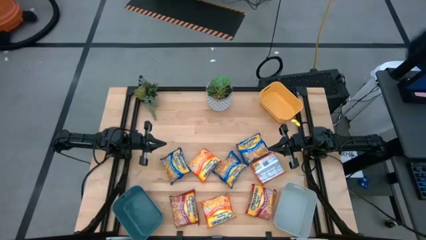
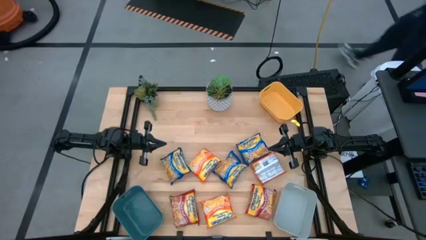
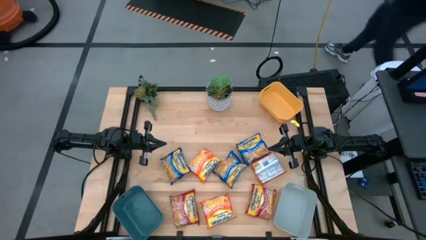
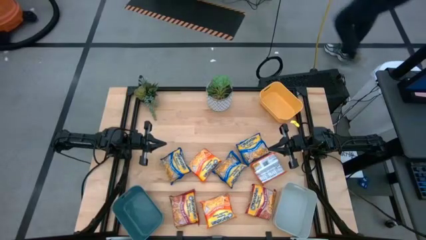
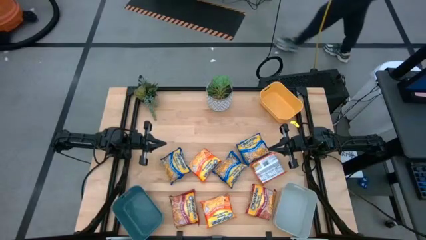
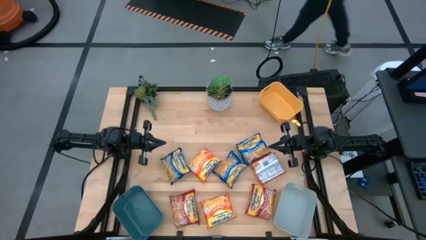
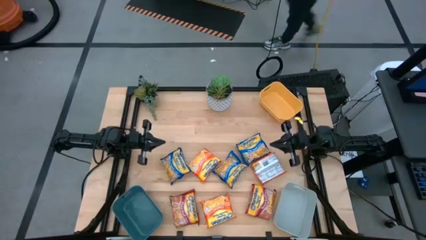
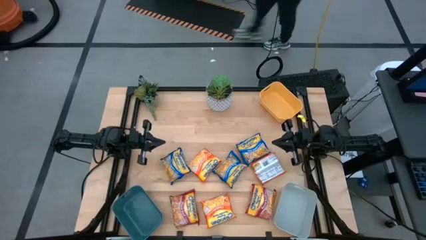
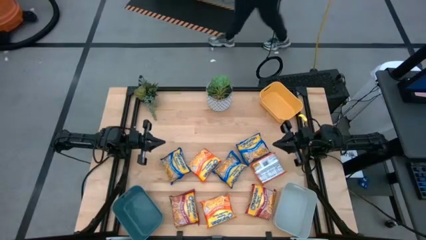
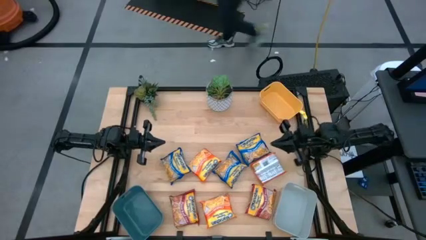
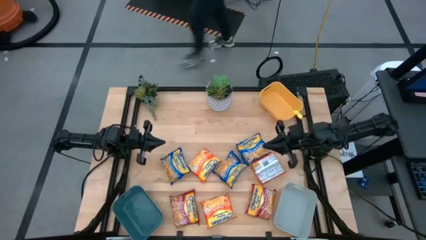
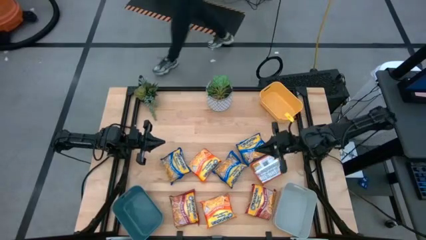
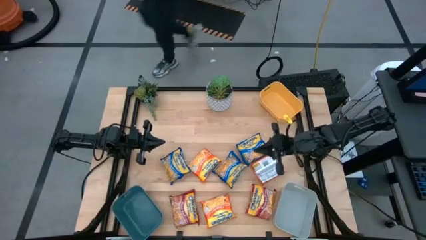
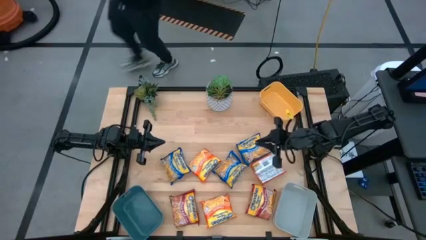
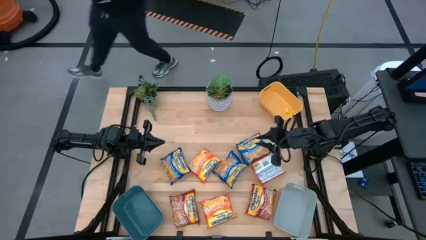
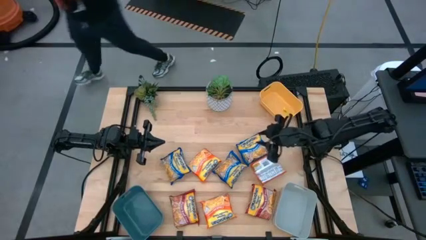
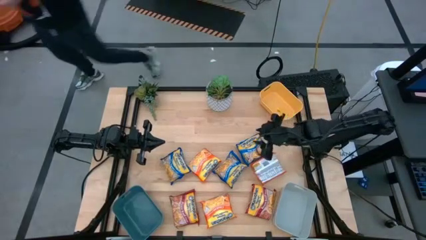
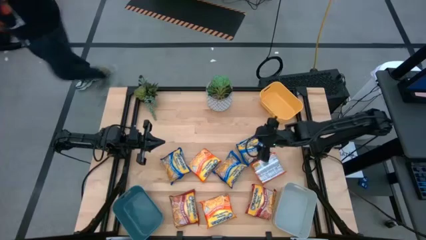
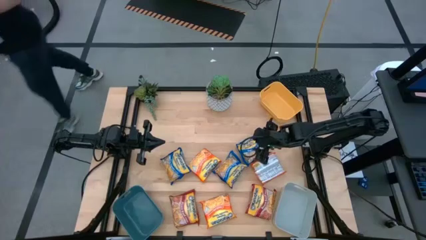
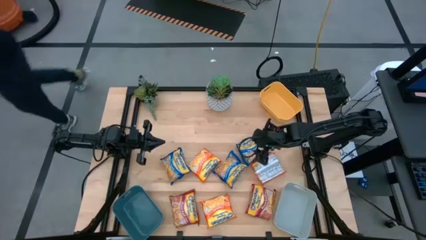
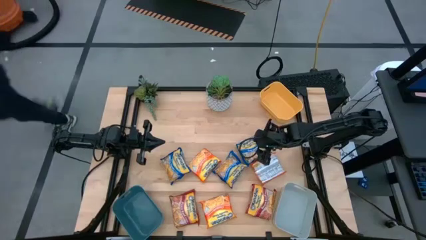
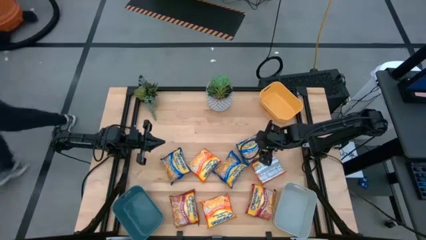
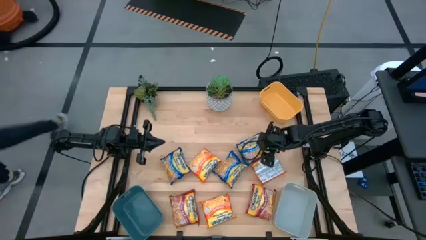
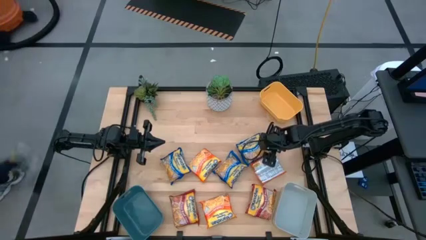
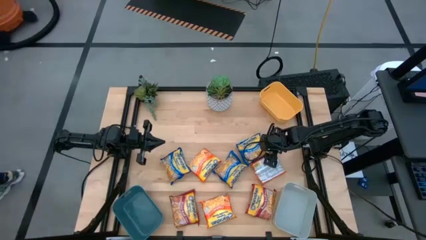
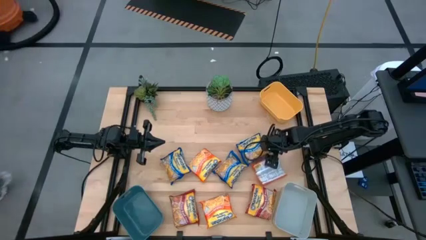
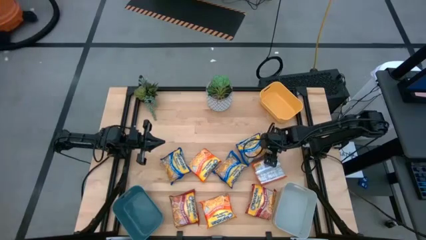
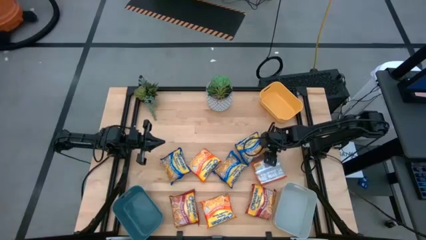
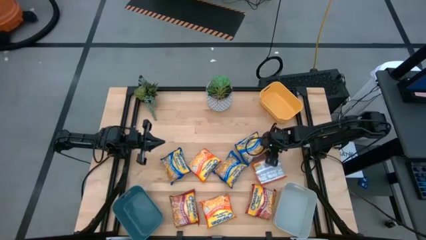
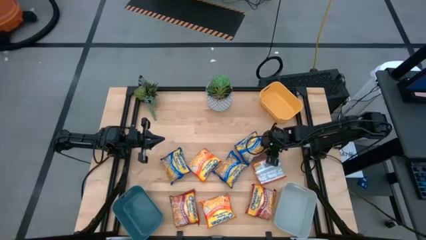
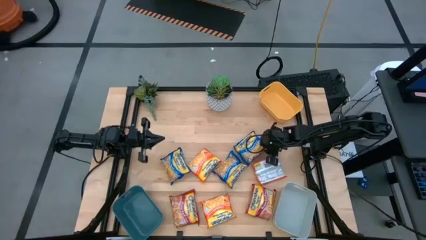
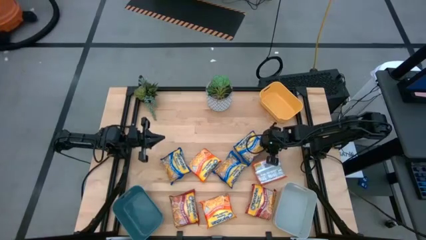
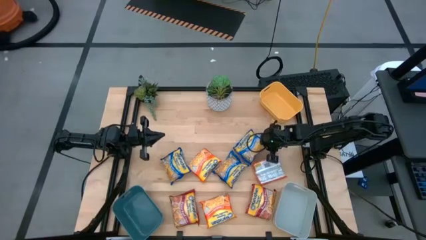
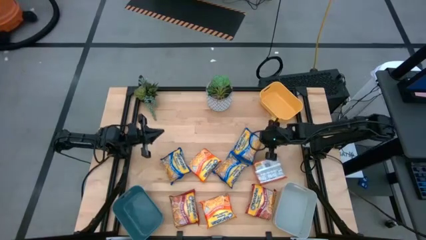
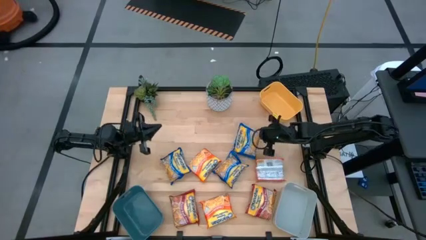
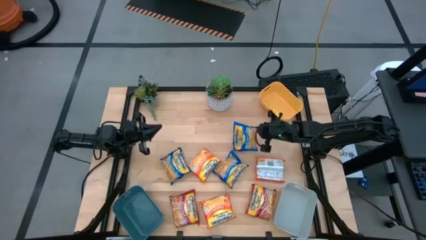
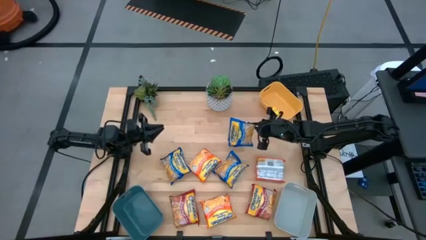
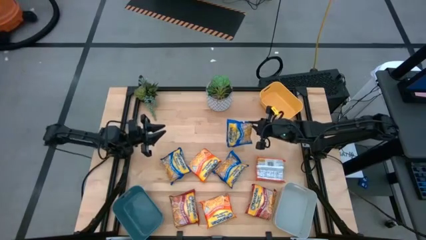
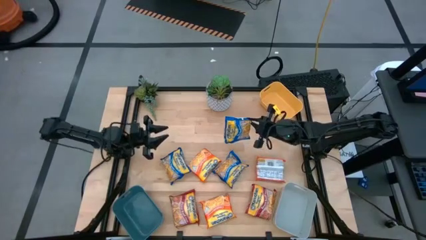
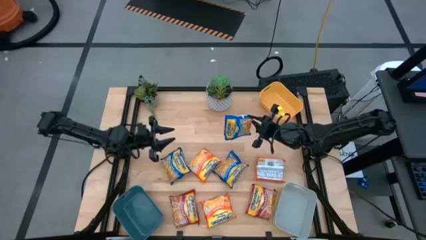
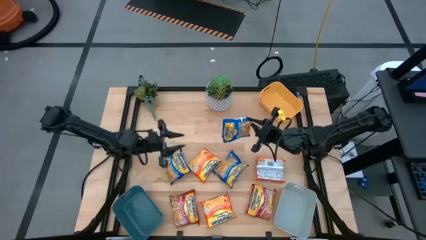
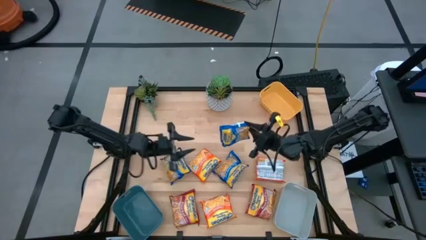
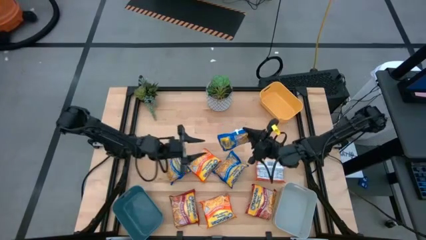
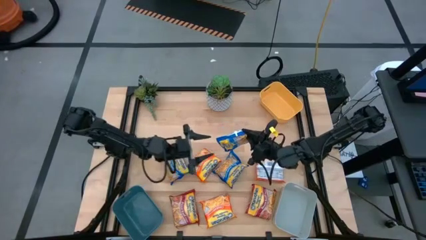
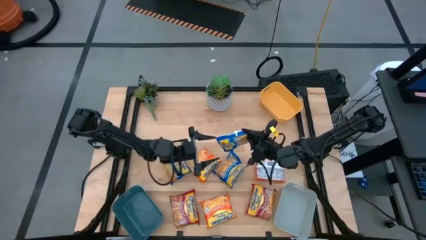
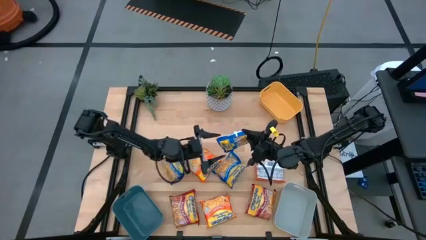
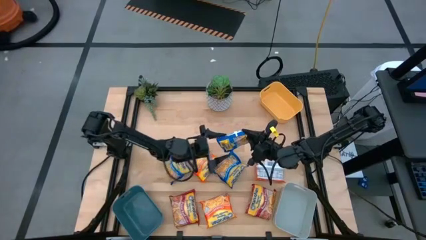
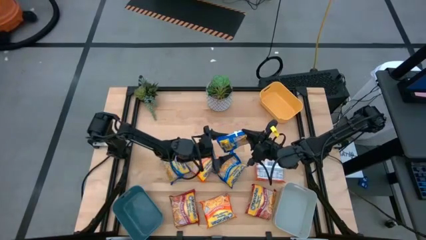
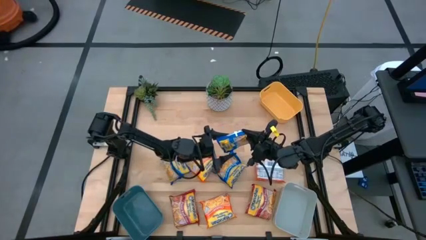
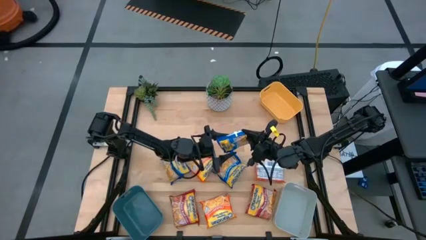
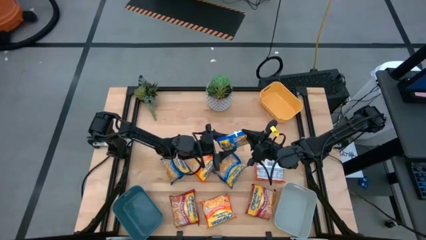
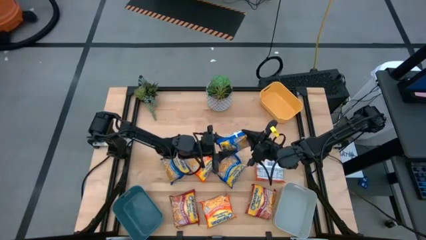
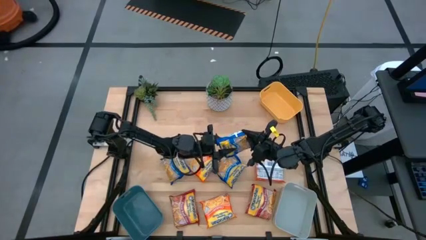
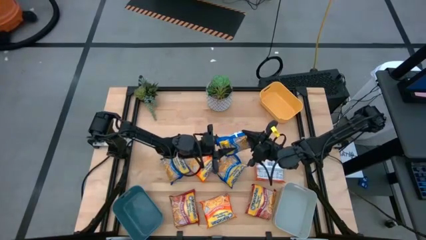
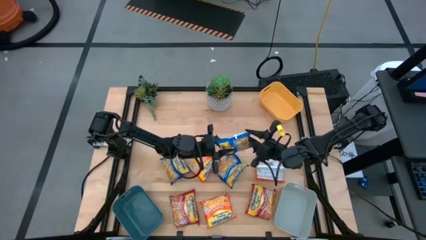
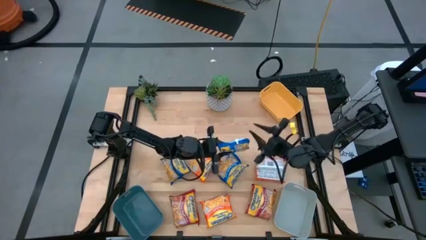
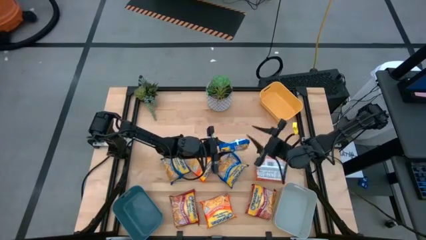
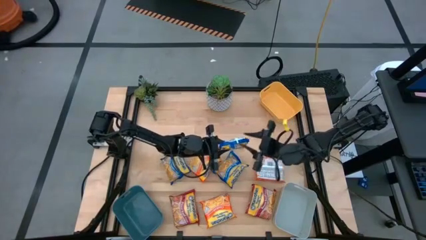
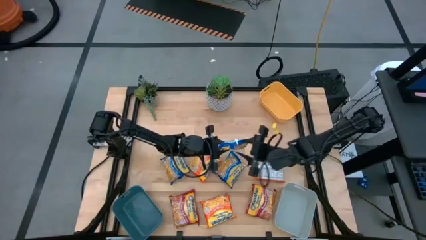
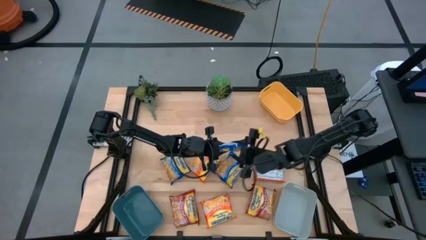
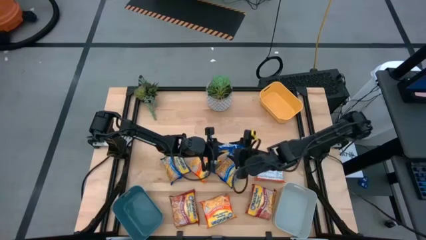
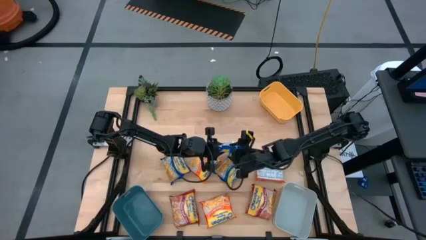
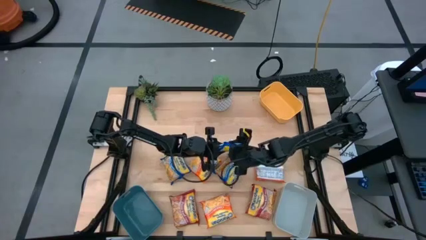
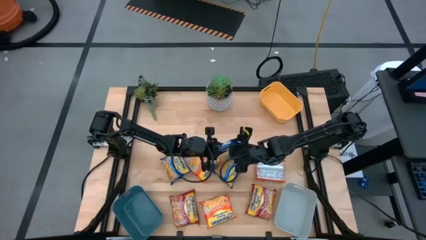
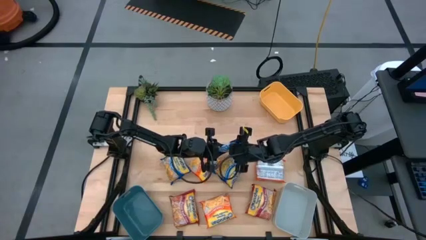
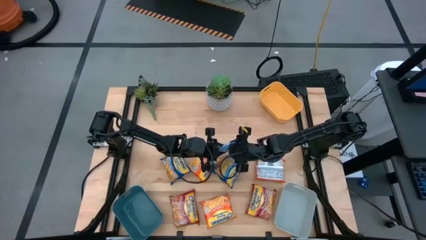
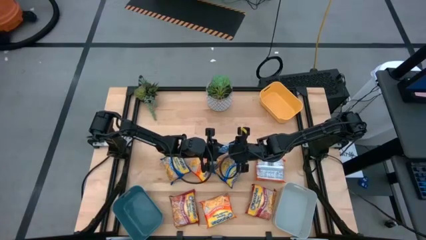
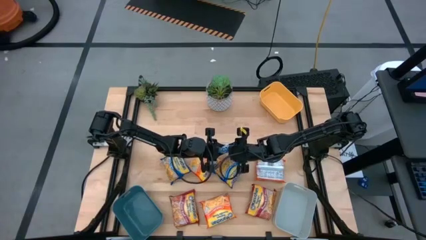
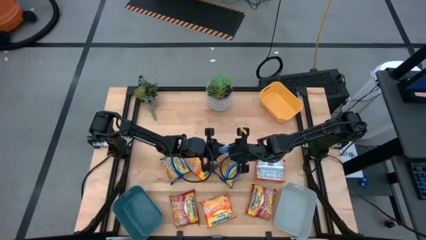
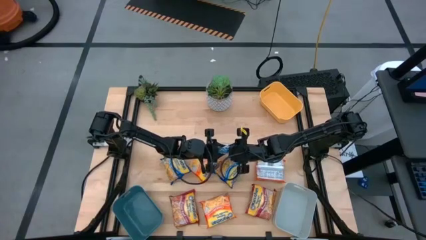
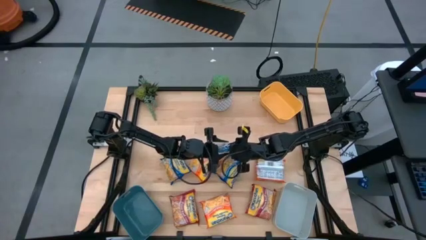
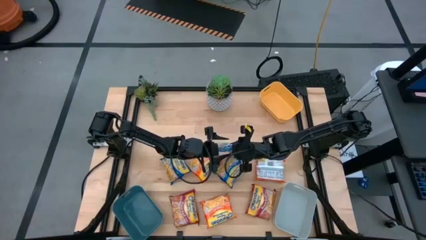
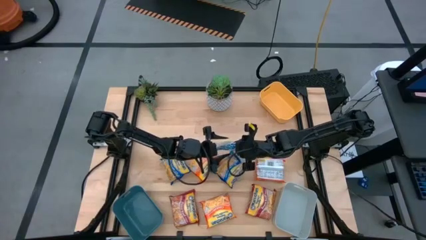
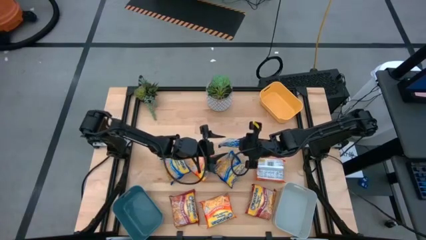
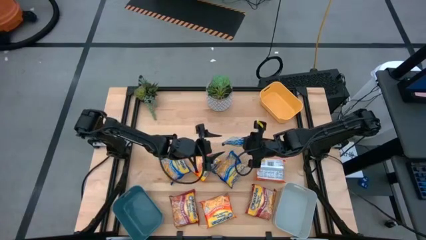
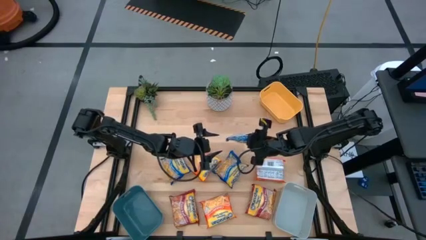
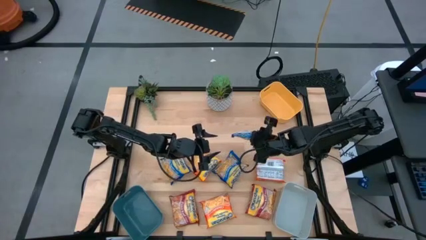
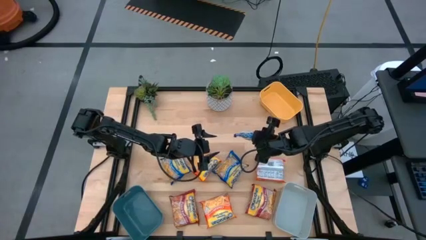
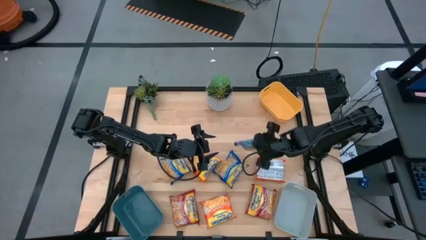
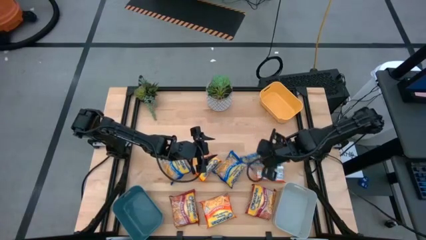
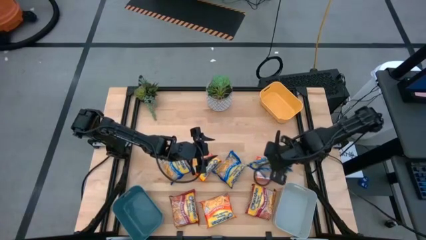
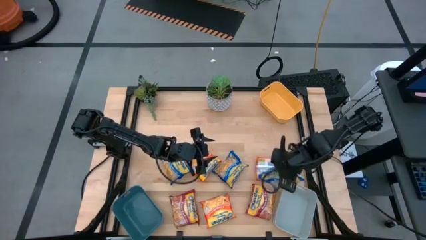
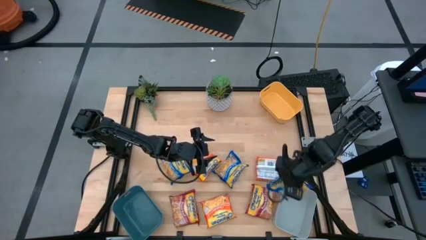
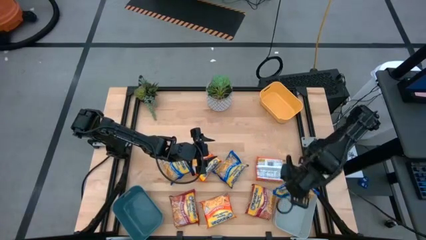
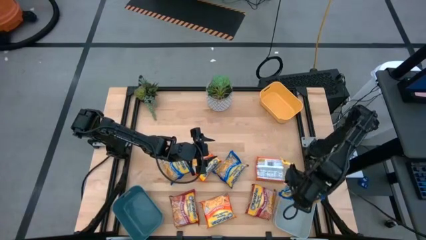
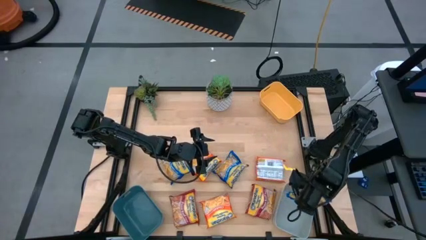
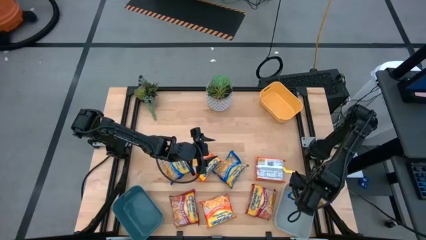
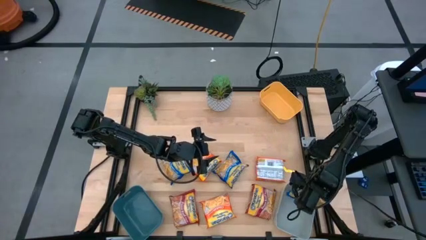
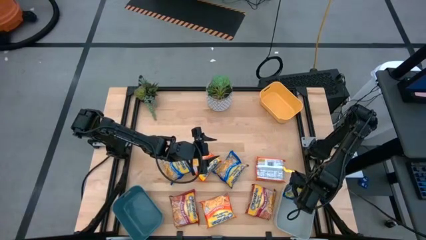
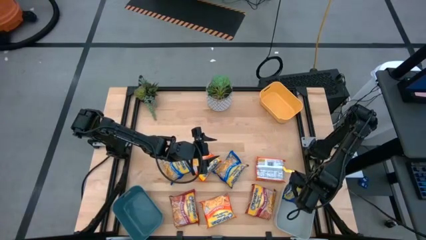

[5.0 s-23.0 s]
Task: Sort Maruchan noodles
Put the right blue noodle pack into the gray bin
